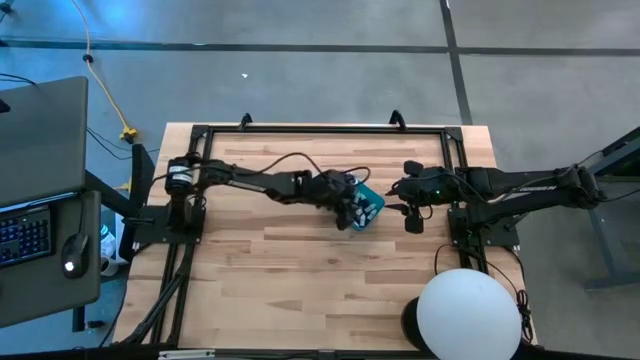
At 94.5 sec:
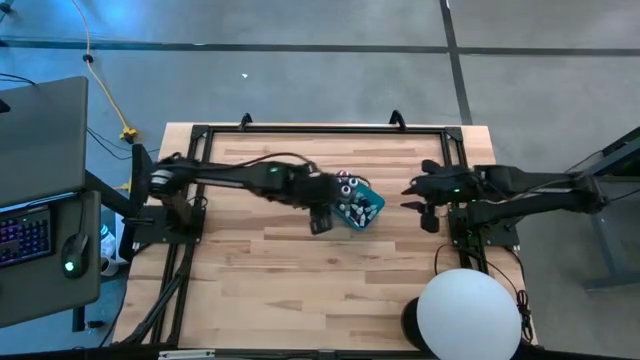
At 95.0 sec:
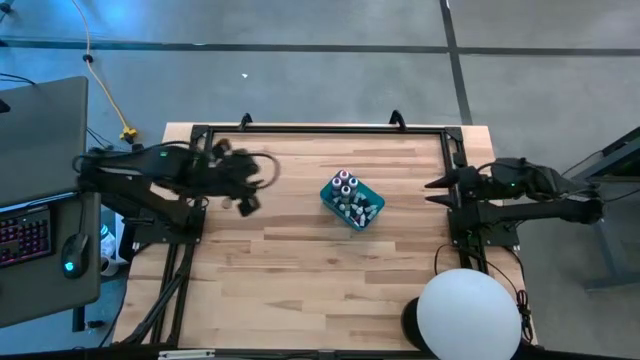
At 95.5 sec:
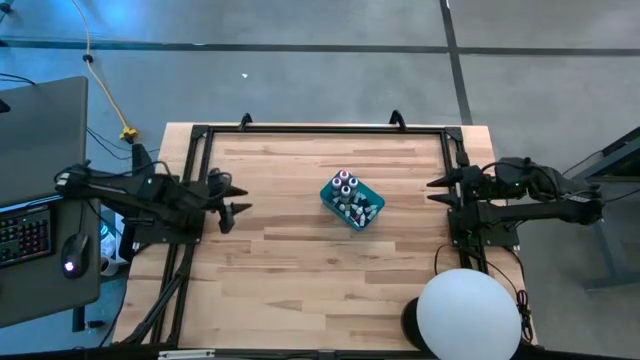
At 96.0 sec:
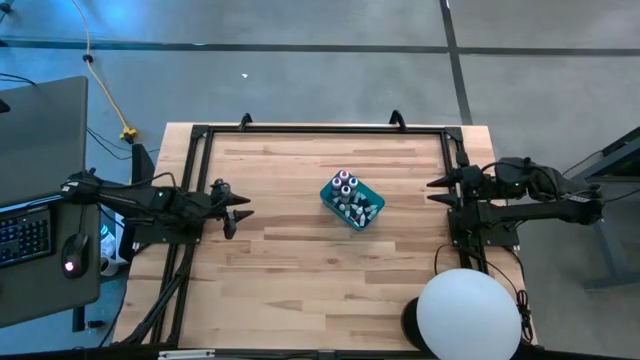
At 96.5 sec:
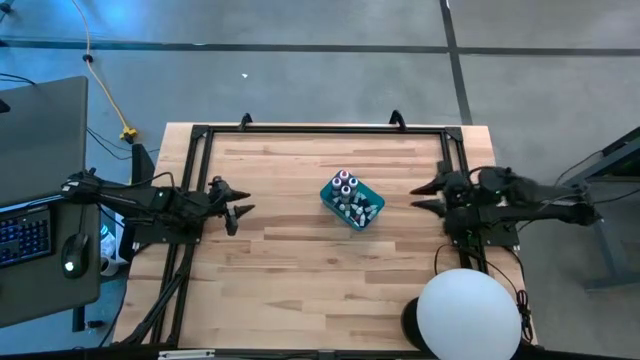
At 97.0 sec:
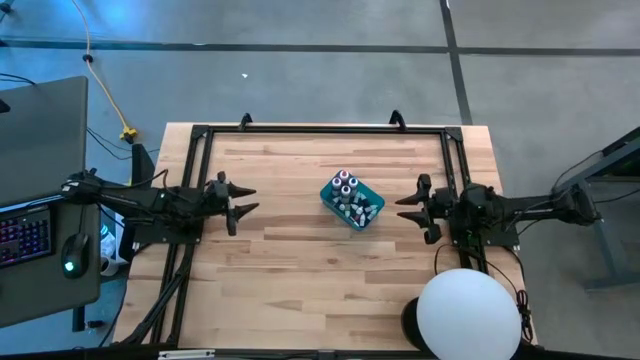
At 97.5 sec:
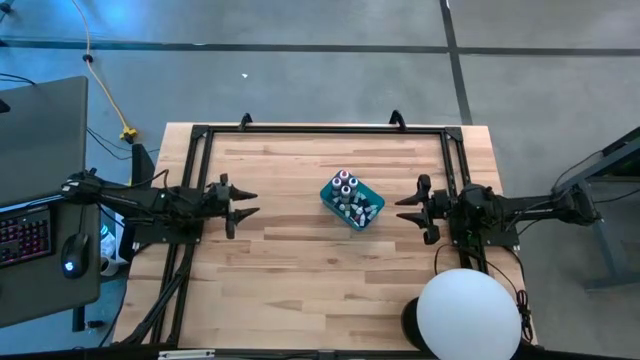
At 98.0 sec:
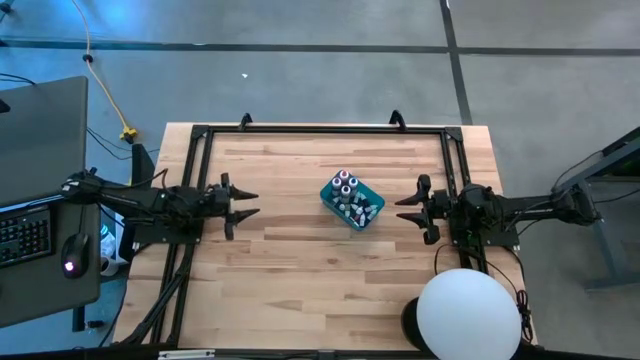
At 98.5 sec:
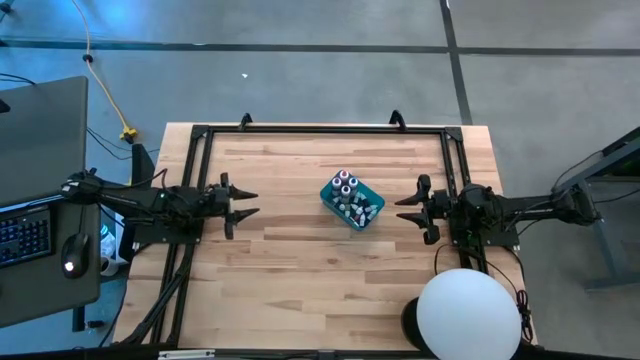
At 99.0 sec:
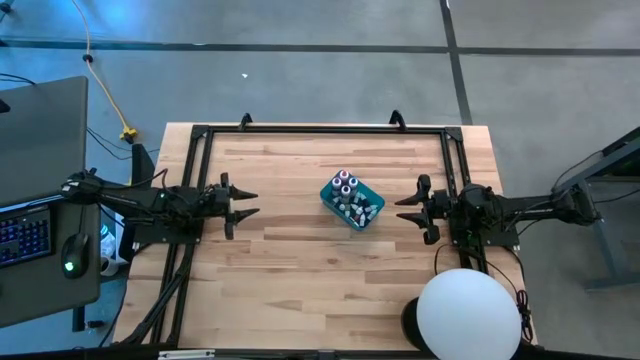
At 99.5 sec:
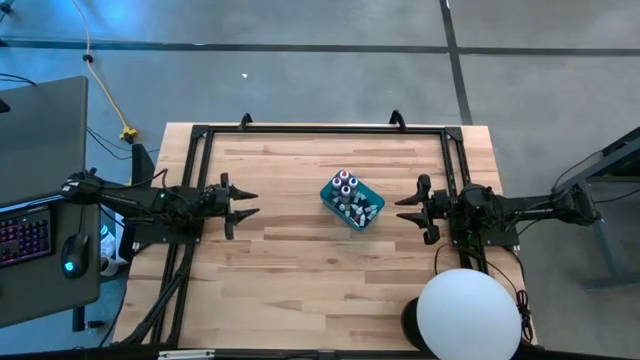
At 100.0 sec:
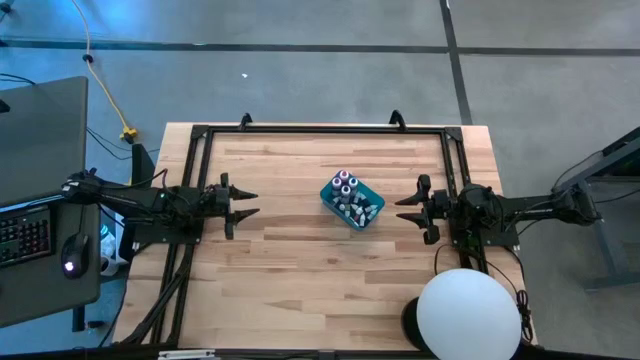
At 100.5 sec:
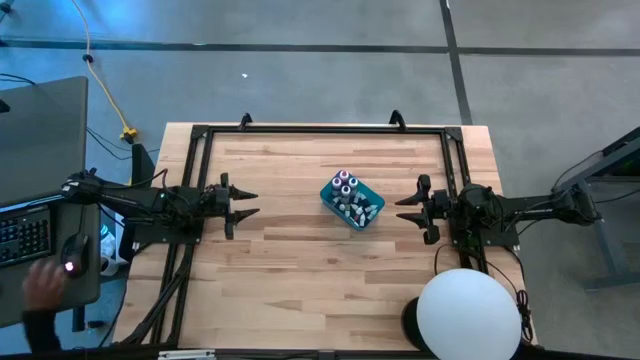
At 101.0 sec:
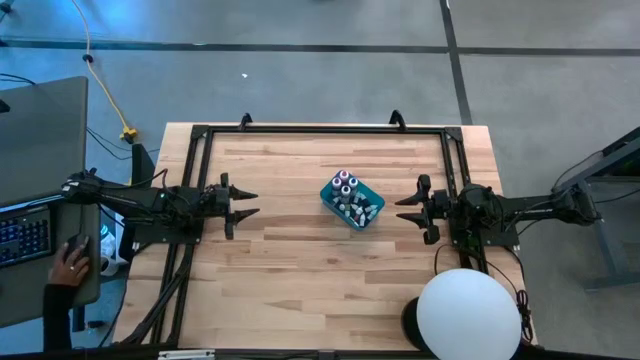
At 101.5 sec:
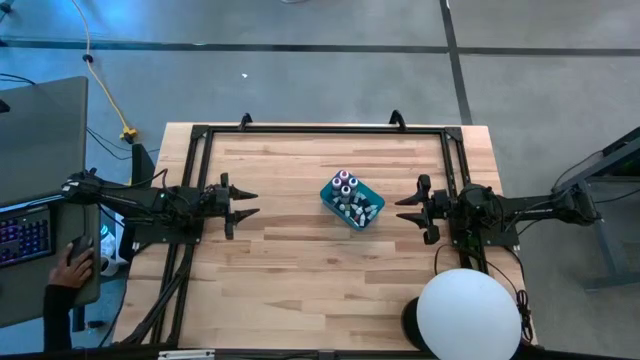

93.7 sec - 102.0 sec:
Task: Pick & Place food coloring
Return to Home Position

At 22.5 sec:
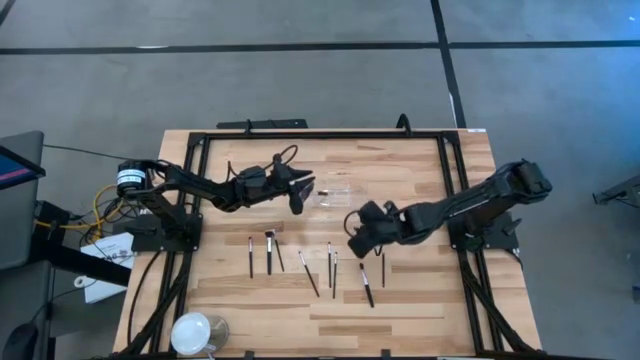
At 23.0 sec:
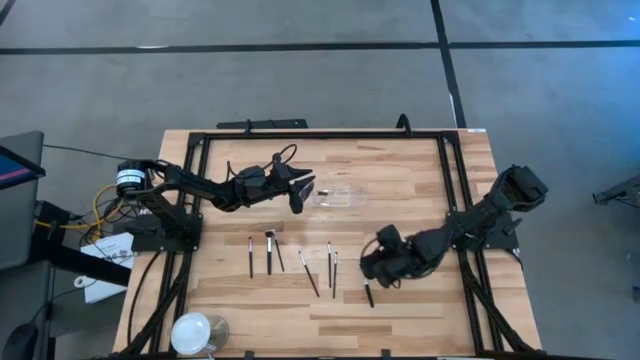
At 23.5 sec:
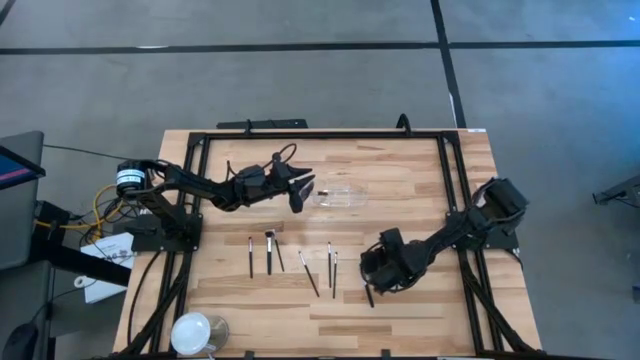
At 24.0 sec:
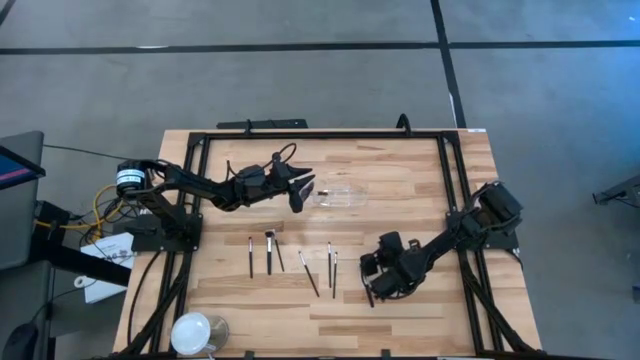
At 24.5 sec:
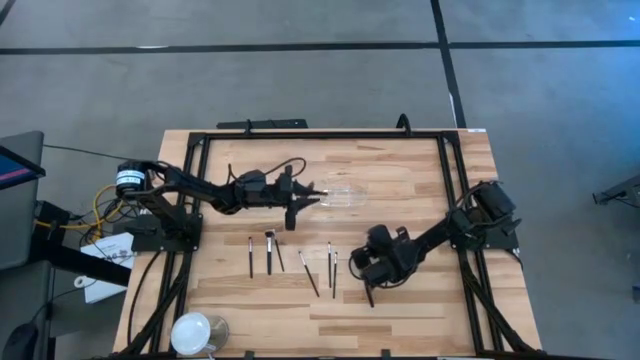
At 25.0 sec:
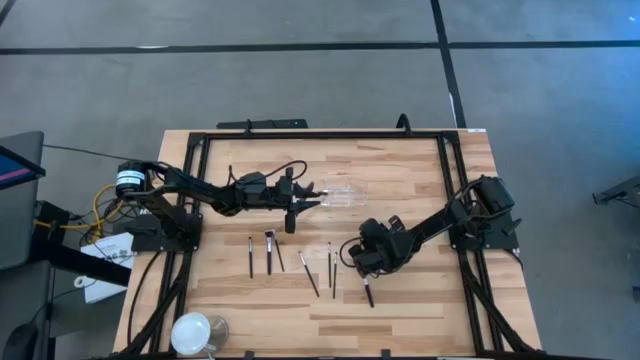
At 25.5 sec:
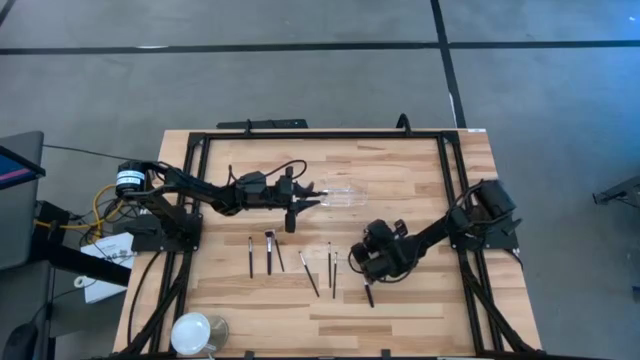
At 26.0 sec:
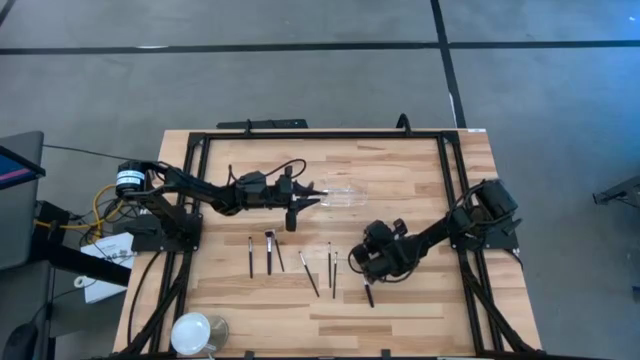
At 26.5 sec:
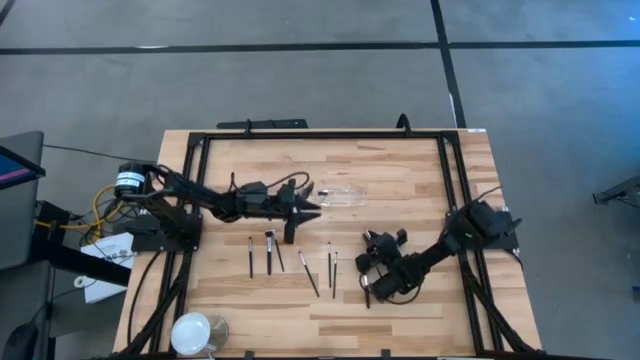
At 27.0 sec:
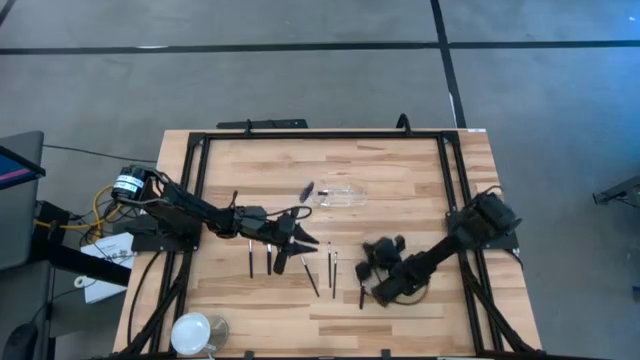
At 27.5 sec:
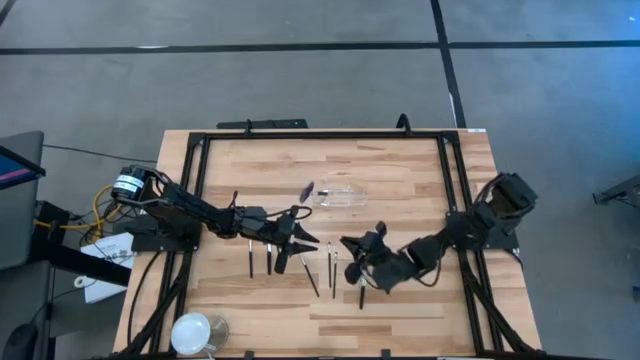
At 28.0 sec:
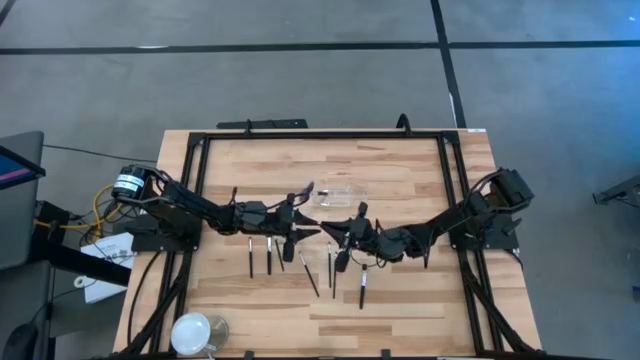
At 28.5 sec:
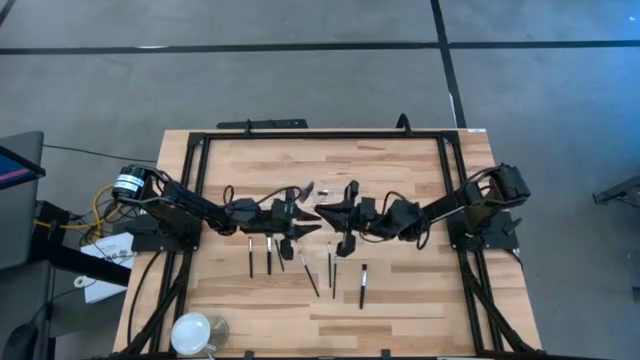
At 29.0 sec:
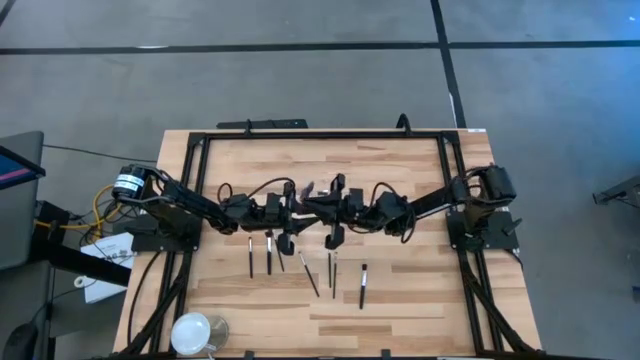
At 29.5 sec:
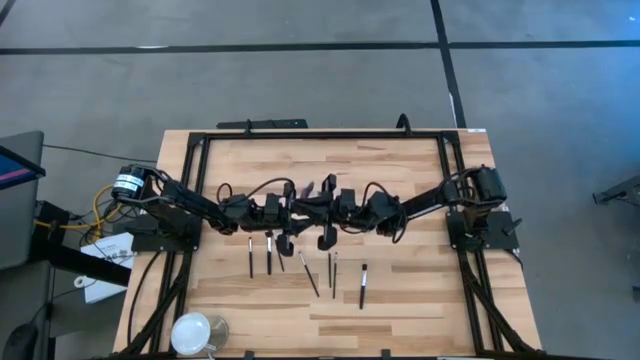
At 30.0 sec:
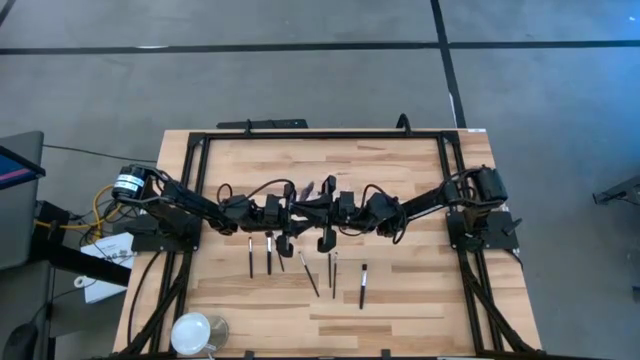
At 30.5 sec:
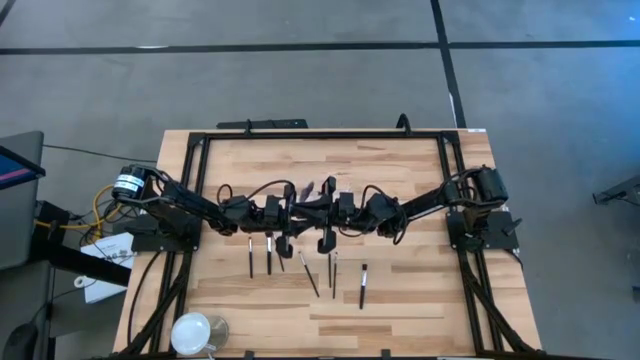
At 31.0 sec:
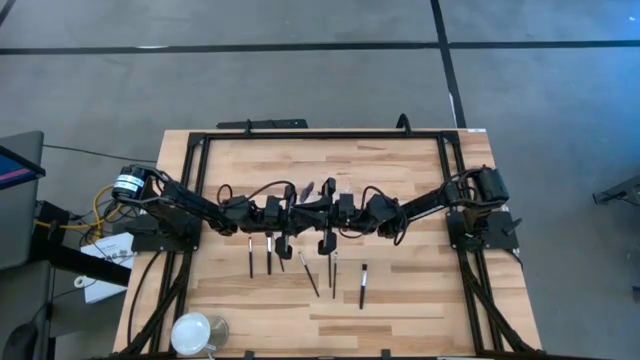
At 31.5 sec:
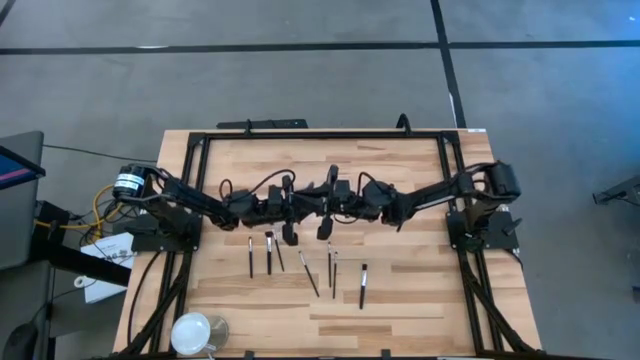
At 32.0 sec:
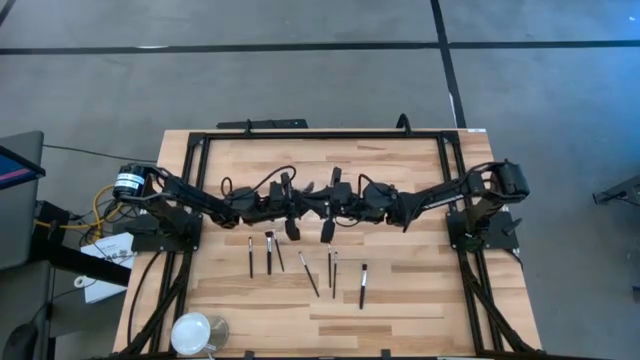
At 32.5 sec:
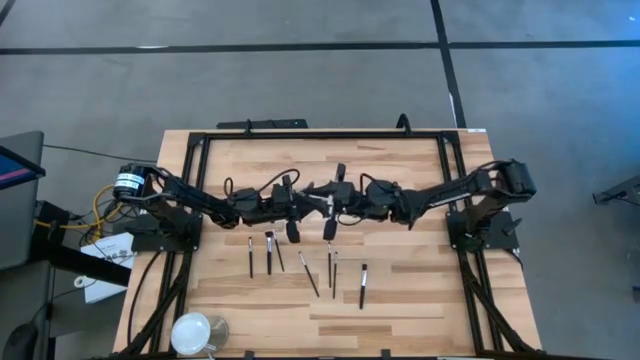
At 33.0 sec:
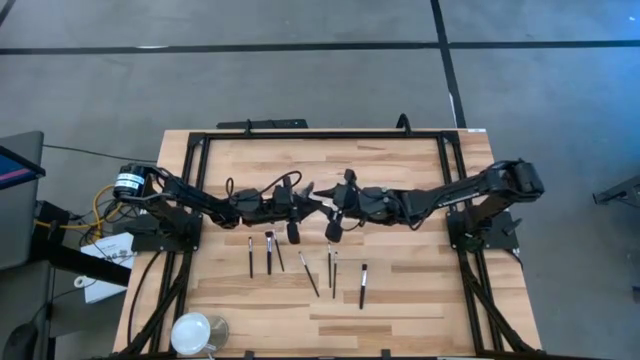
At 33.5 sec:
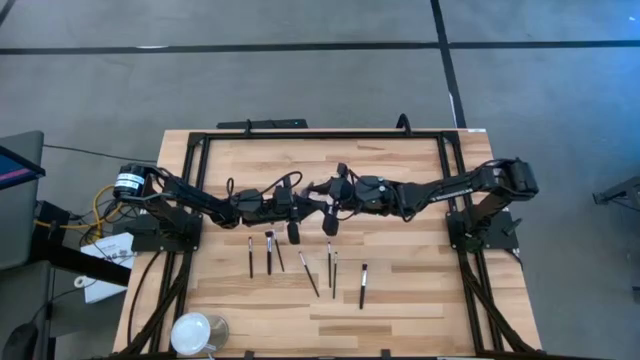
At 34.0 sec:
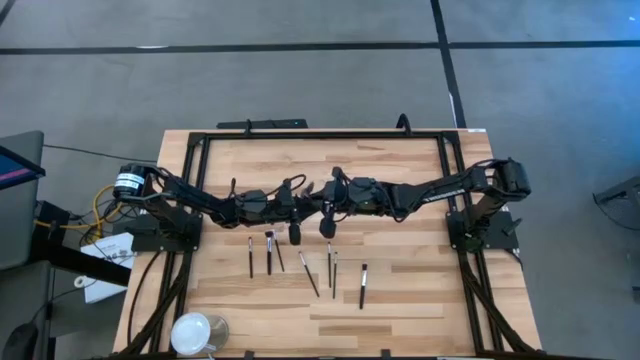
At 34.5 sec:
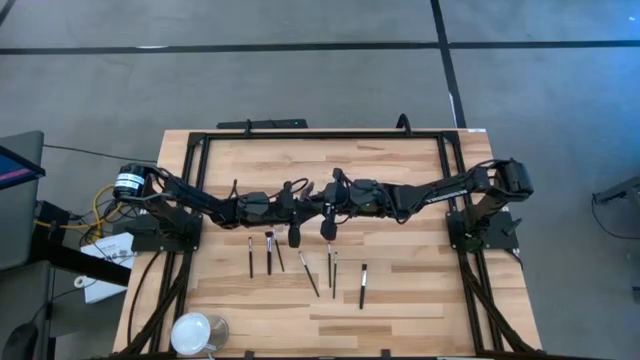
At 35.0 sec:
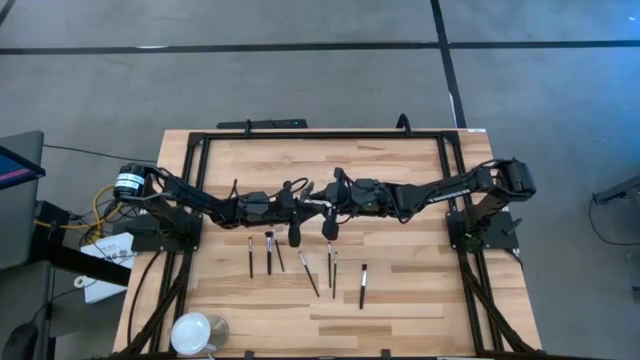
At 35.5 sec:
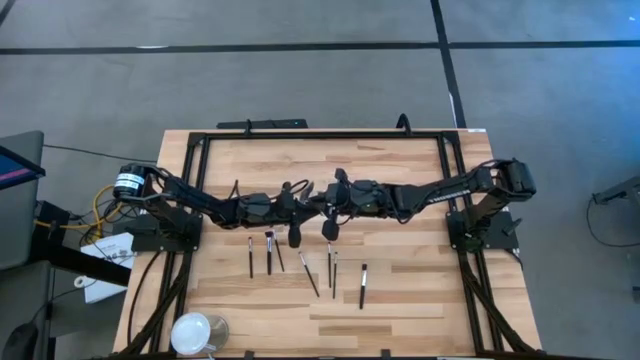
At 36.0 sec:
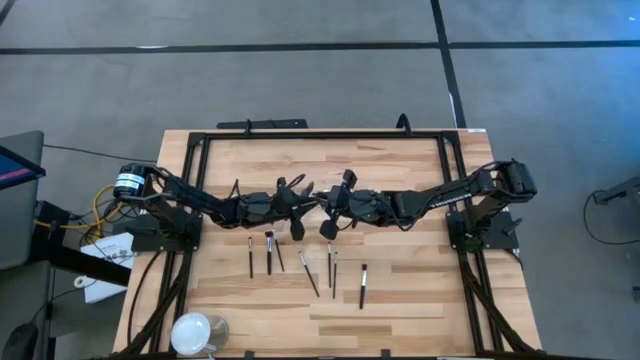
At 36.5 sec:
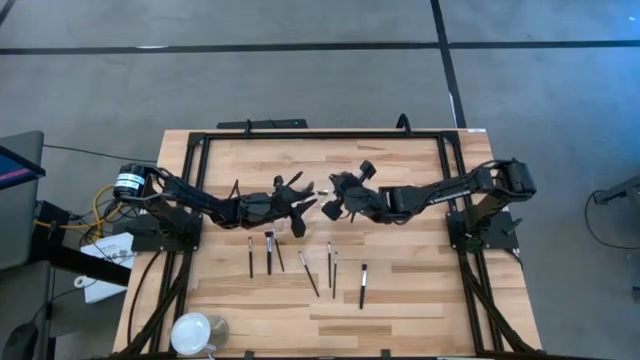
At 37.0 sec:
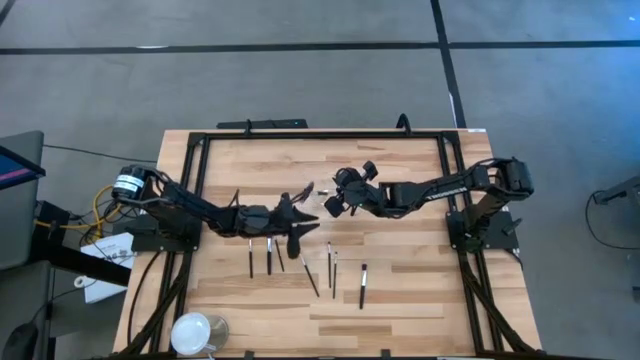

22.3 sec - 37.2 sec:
Task: Put items in baskets/containers
Put the liner brush into the middle section of the transparent organizer
